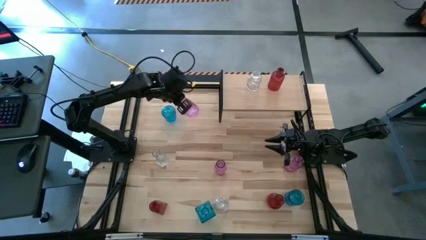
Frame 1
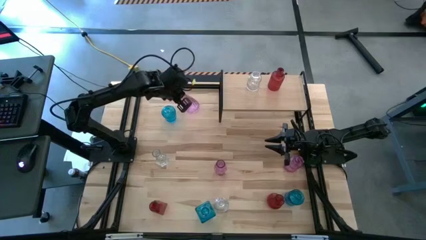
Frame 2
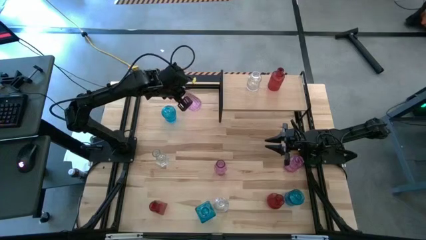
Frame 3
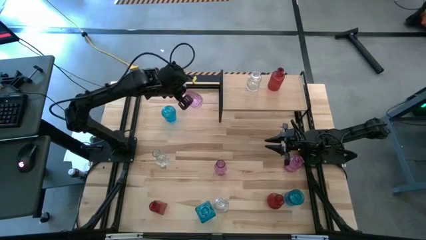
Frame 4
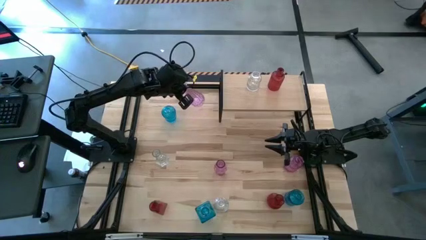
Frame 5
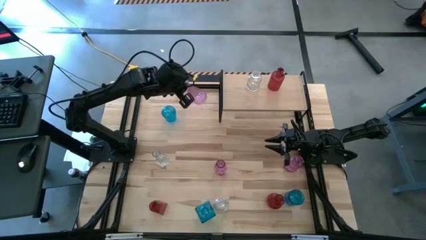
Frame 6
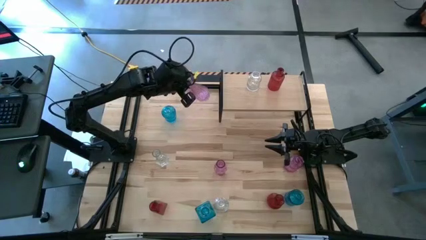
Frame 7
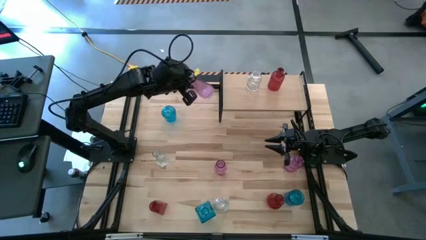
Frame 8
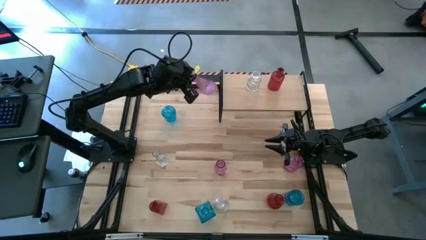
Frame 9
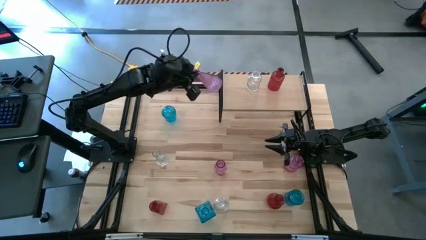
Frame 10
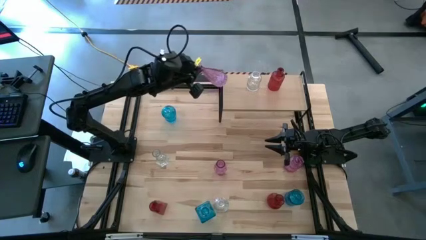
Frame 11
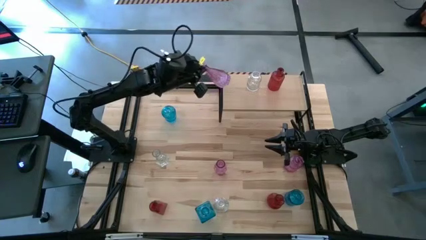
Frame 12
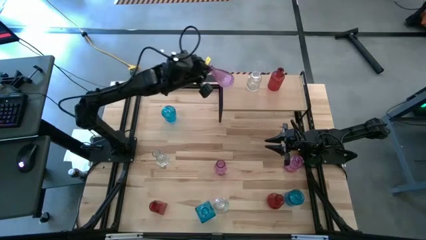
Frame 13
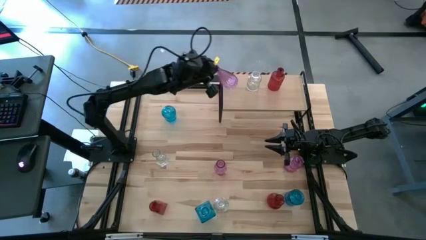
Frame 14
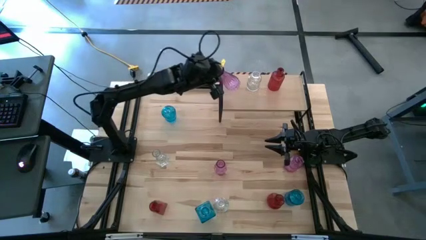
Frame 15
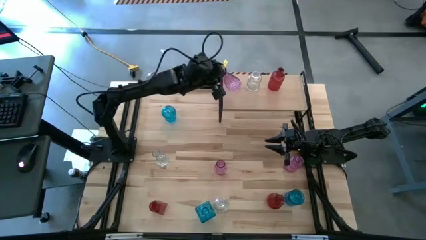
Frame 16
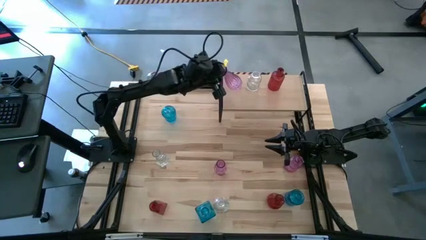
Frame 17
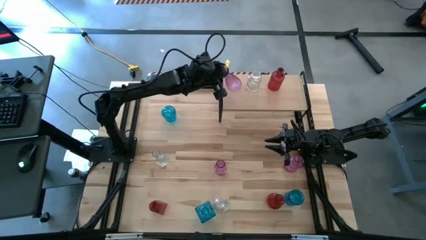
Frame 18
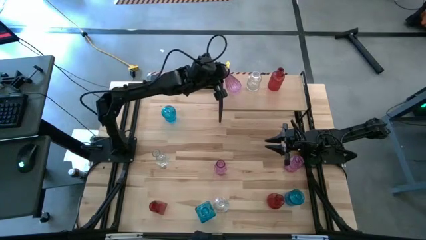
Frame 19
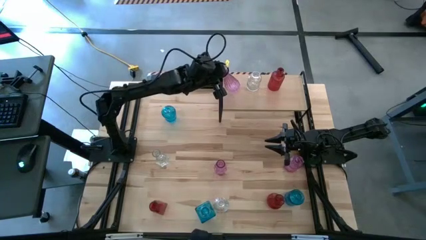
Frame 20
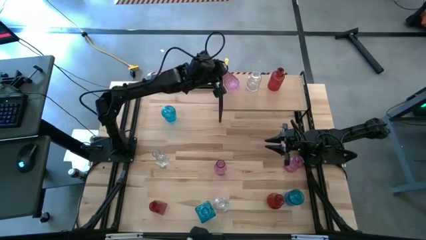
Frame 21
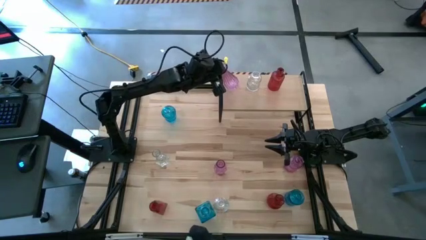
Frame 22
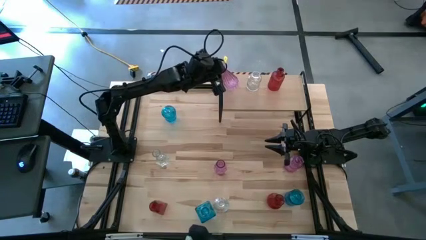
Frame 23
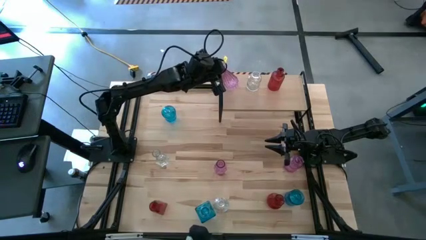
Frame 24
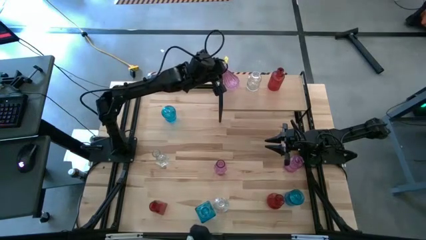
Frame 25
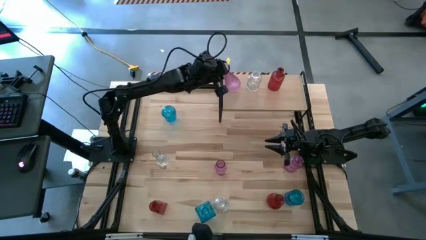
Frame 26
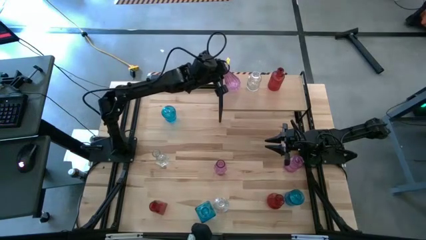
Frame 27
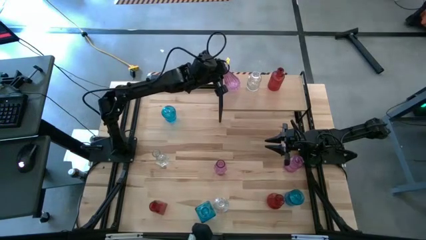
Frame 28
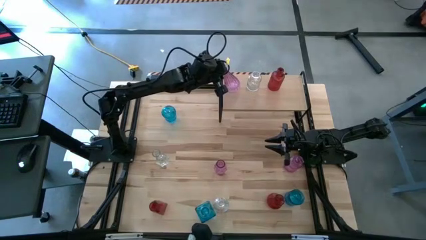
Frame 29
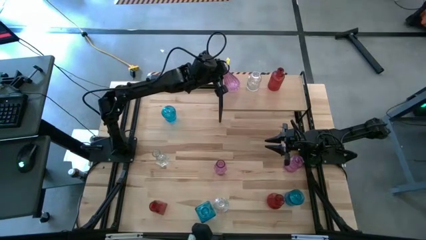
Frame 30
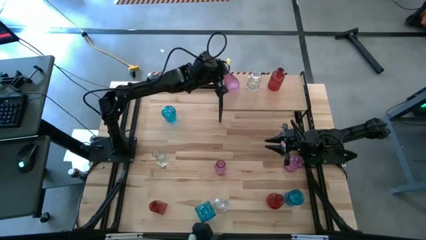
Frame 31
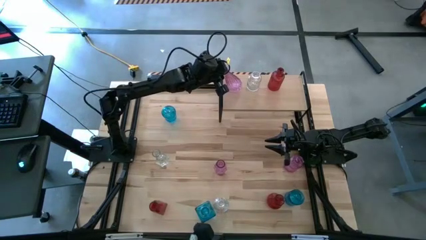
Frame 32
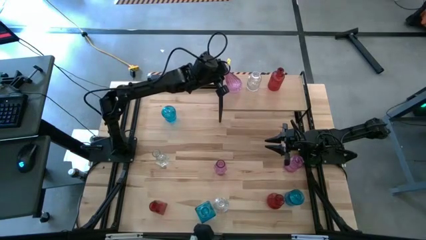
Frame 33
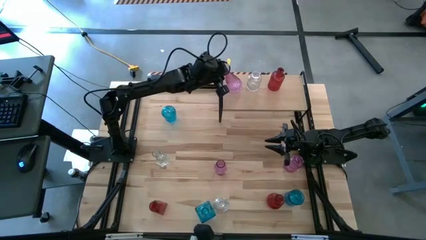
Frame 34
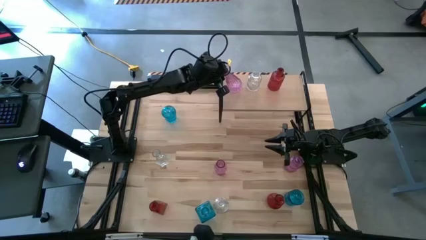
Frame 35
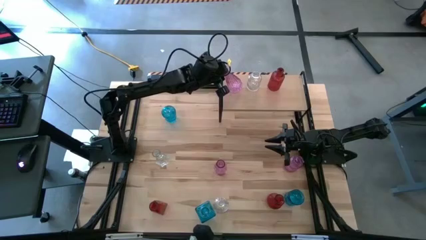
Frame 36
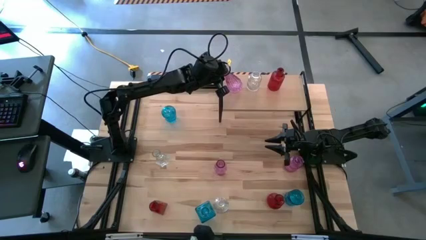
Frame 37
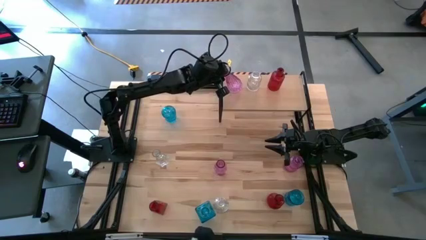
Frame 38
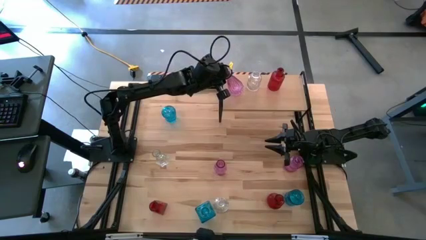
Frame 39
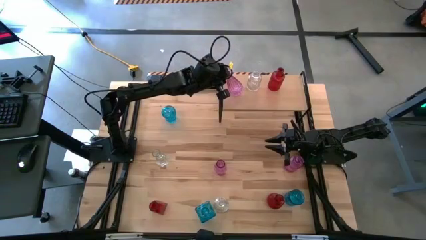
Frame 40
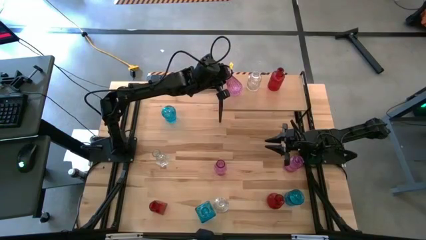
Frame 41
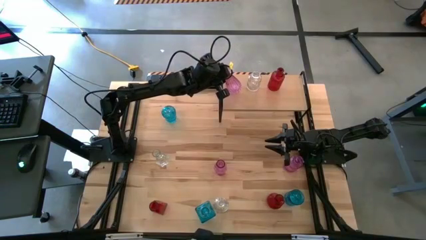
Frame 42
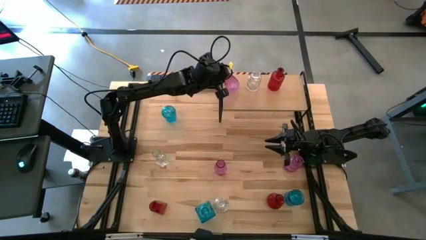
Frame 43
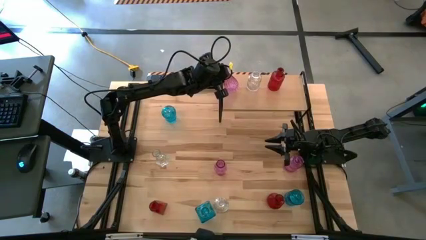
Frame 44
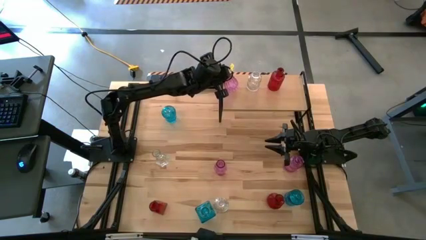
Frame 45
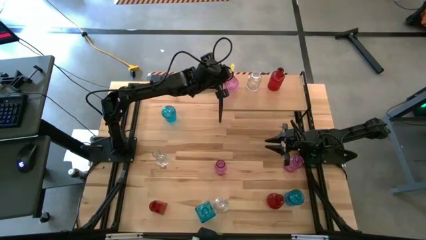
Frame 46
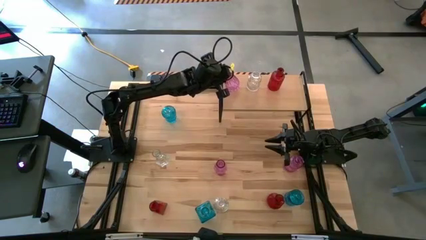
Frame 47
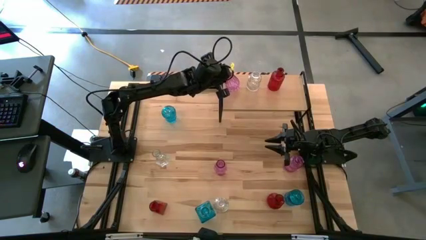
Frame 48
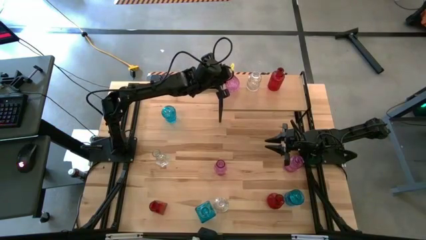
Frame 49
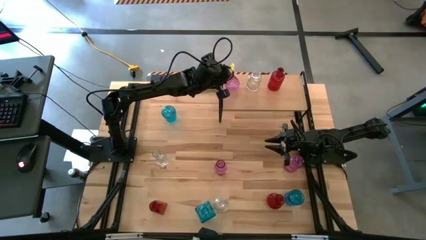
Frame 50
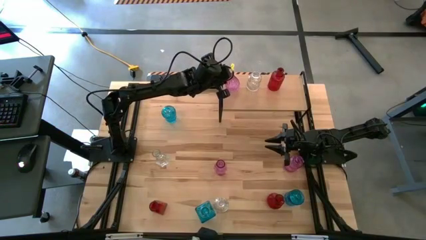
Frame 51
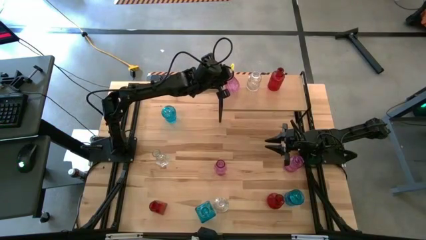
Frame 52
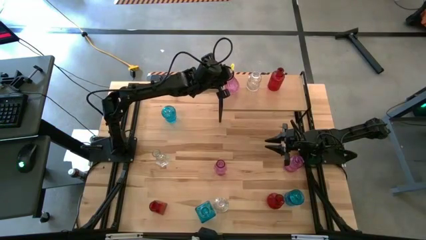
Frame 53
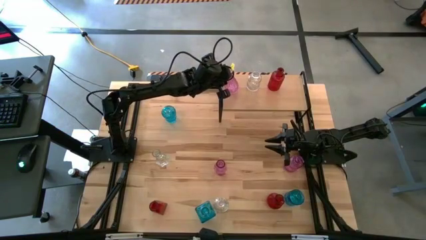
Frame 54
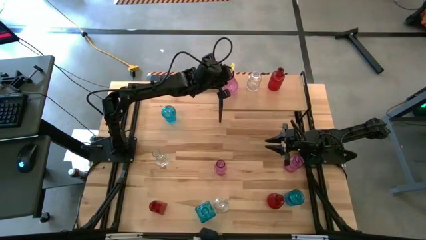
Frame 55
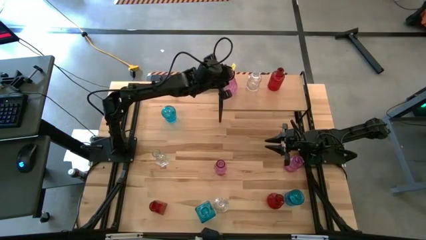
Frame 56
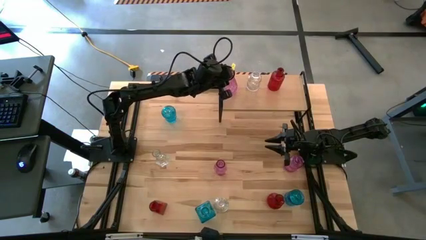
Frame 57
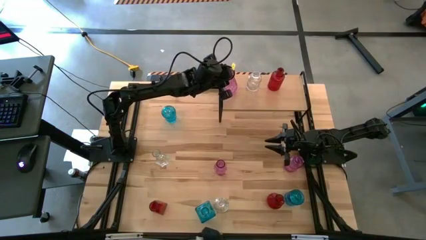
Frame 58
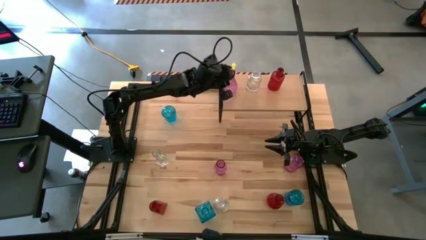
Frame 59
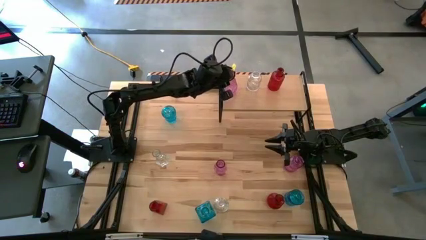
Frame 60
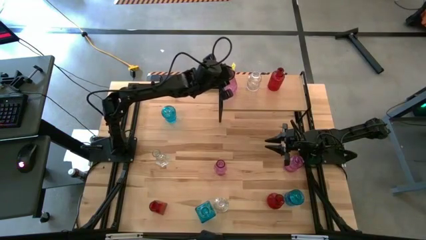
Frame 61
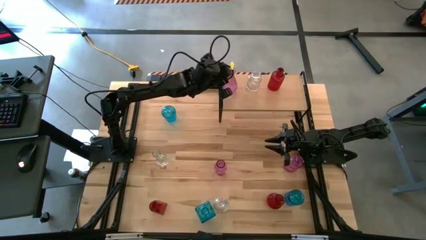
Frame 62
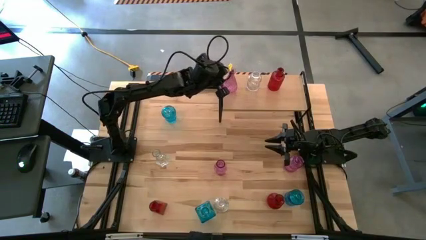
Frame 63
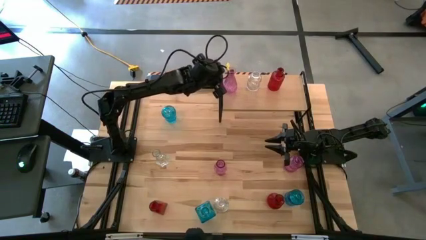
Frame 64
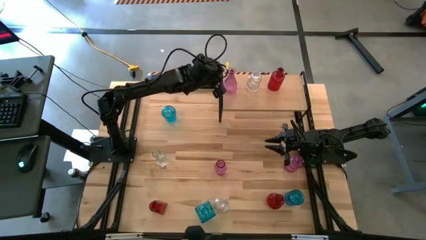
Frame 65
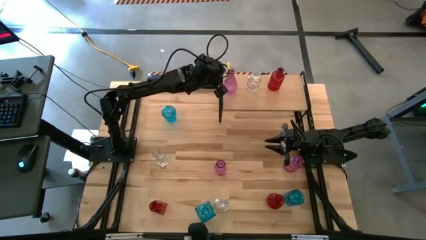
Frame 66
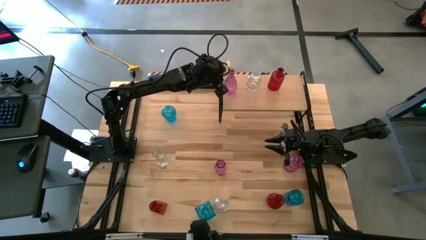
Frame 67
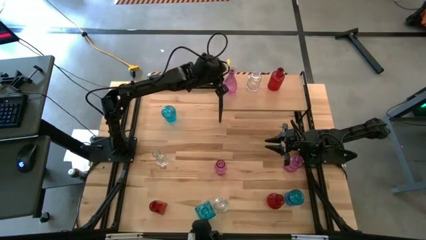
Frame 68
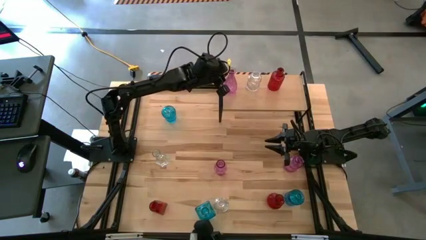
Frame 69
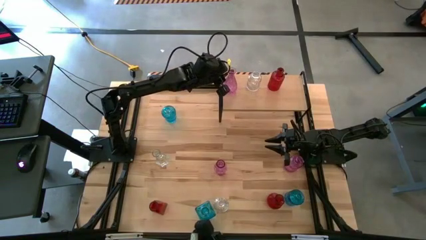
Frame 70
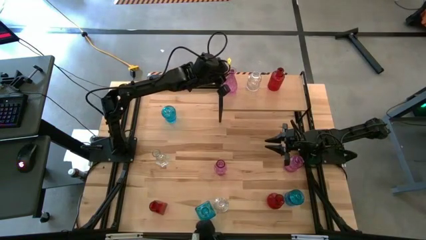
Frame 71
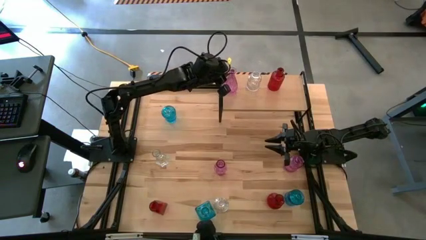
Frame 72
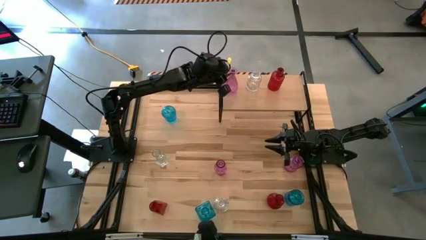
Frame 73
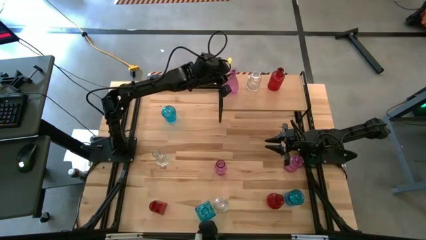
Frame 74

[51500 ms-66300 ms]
Task: sort vases onto shelf
Put the top left pink vase on the shelf
